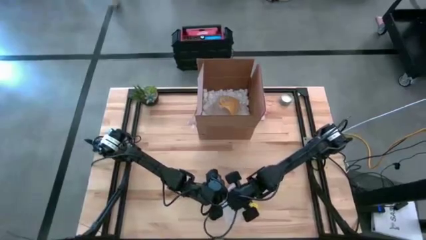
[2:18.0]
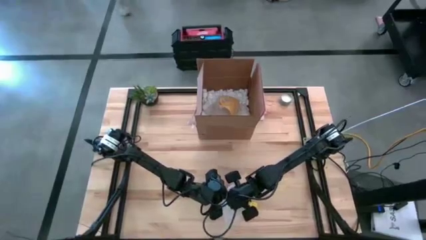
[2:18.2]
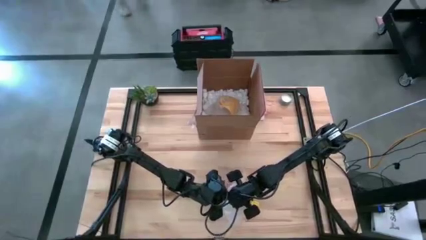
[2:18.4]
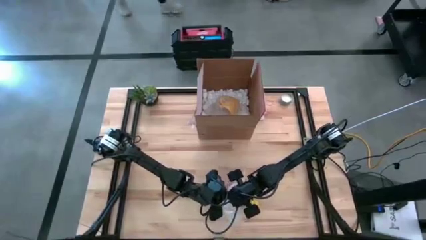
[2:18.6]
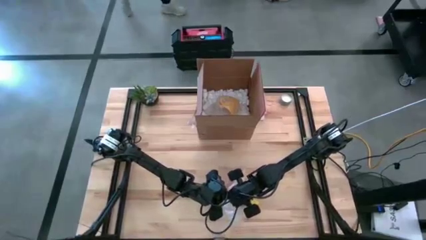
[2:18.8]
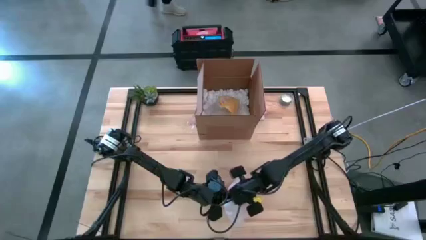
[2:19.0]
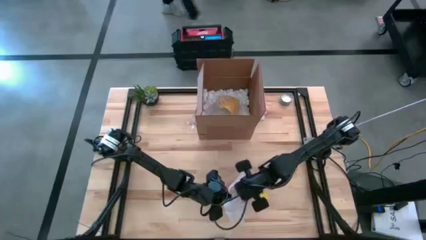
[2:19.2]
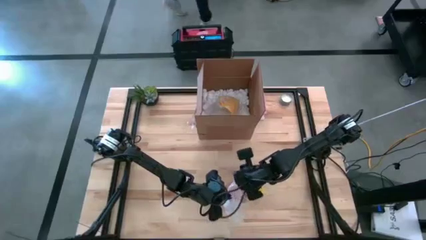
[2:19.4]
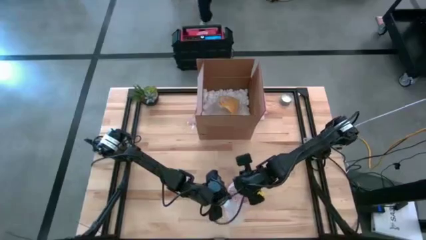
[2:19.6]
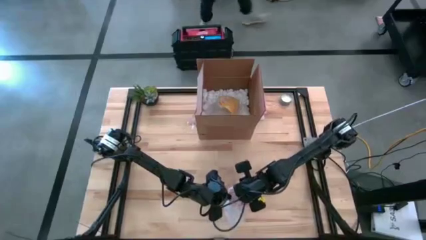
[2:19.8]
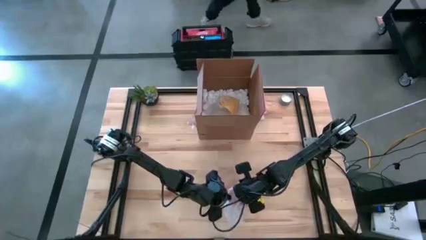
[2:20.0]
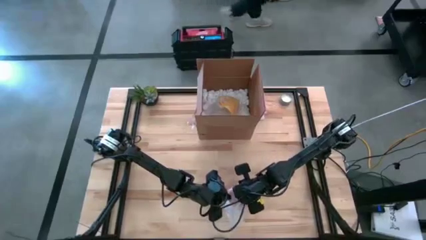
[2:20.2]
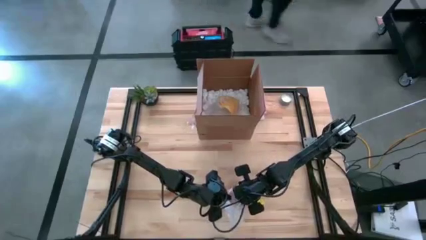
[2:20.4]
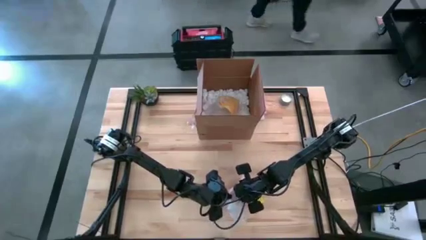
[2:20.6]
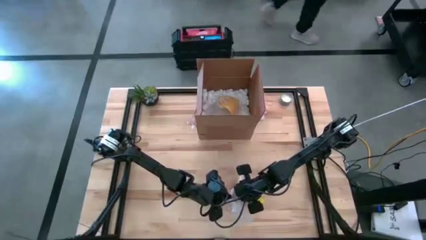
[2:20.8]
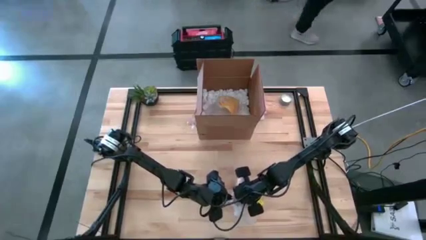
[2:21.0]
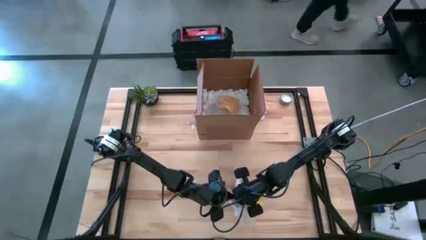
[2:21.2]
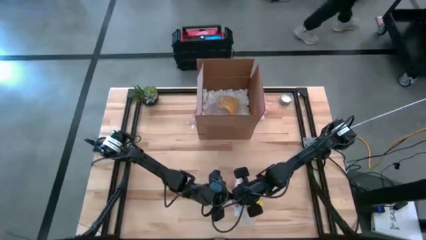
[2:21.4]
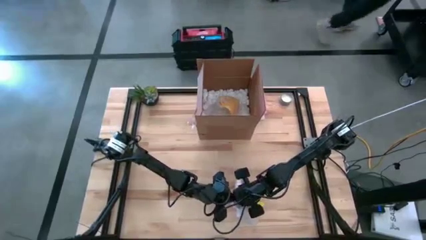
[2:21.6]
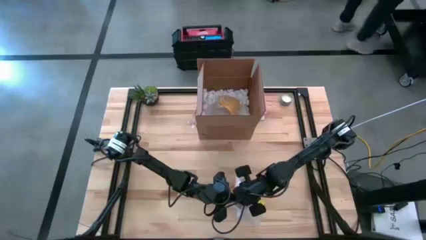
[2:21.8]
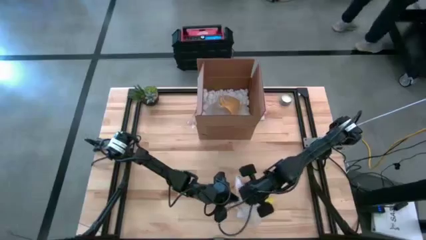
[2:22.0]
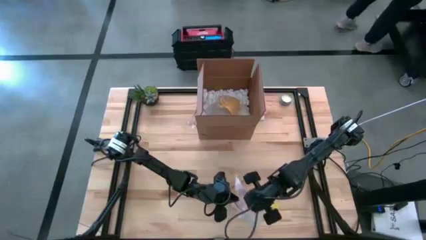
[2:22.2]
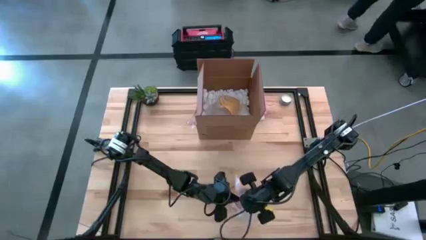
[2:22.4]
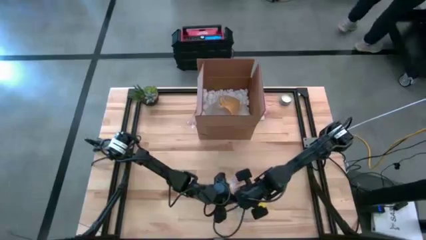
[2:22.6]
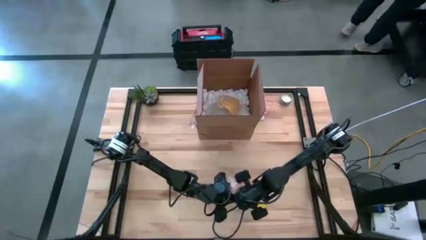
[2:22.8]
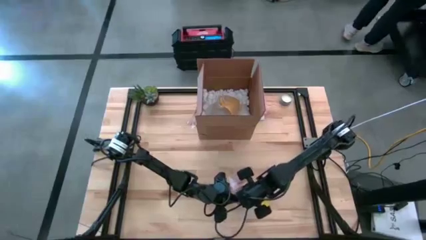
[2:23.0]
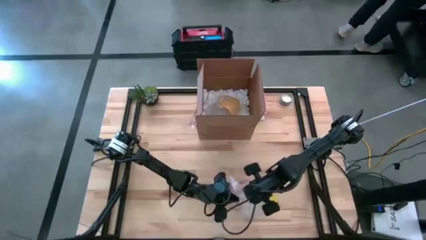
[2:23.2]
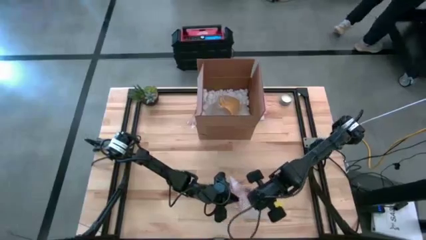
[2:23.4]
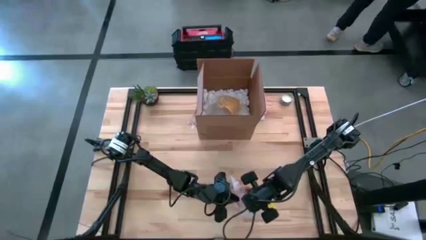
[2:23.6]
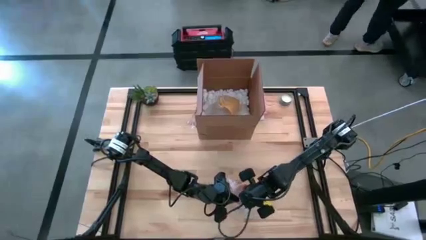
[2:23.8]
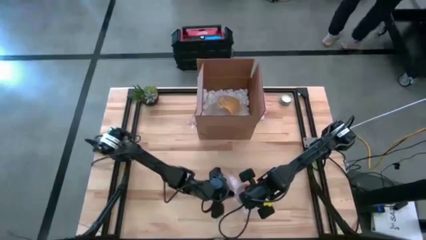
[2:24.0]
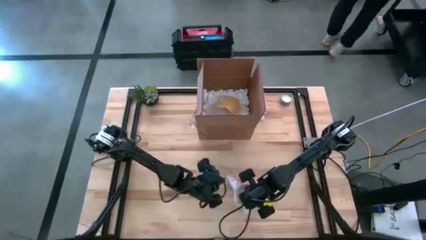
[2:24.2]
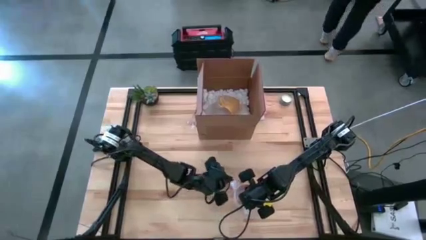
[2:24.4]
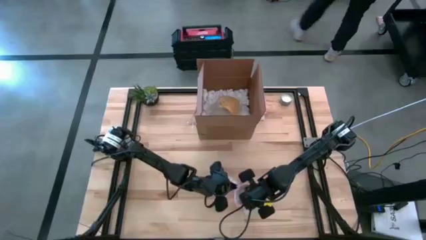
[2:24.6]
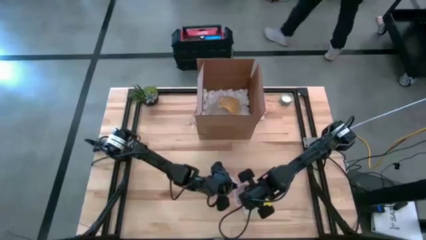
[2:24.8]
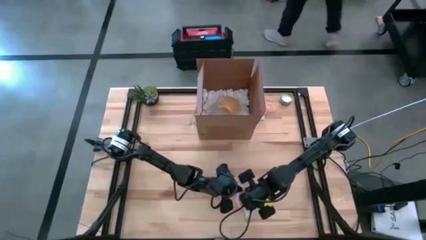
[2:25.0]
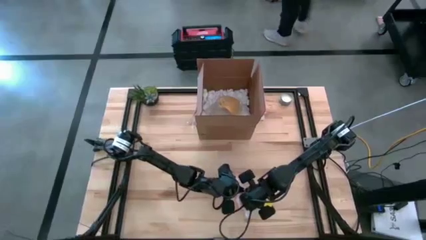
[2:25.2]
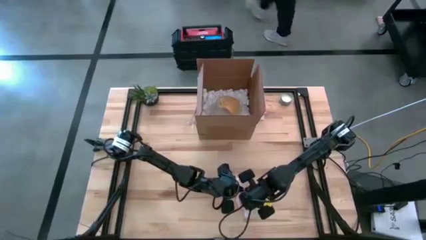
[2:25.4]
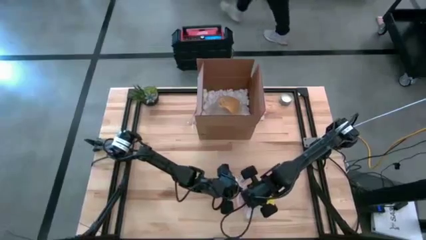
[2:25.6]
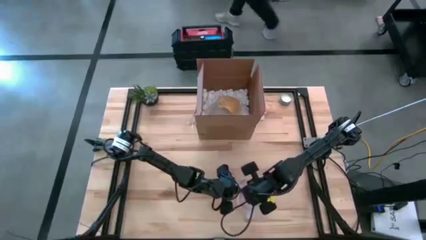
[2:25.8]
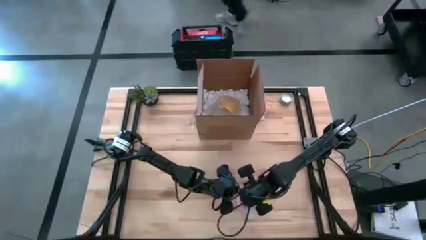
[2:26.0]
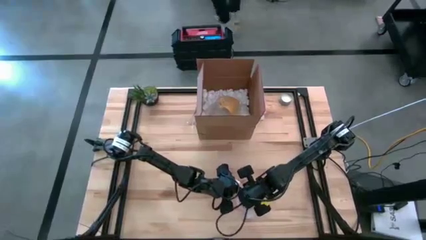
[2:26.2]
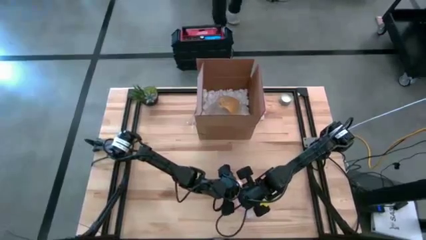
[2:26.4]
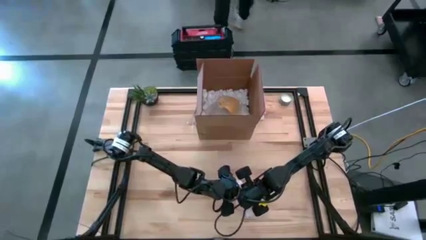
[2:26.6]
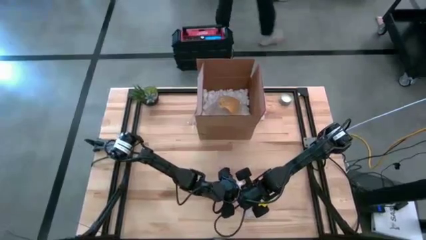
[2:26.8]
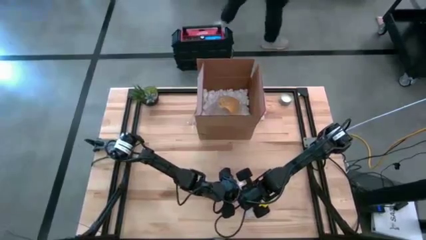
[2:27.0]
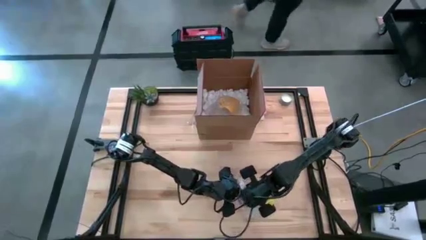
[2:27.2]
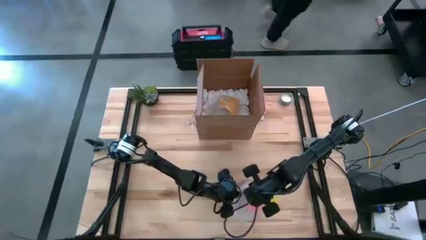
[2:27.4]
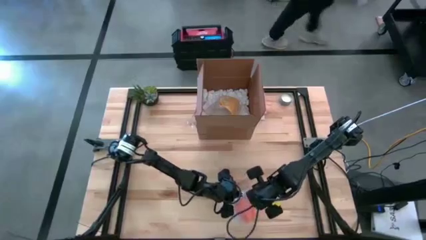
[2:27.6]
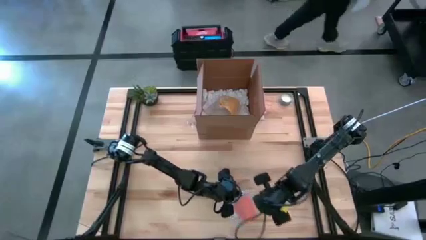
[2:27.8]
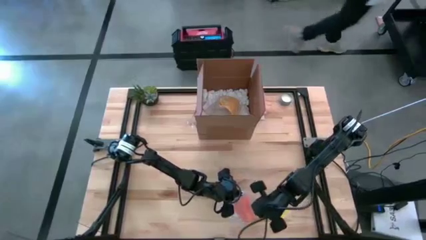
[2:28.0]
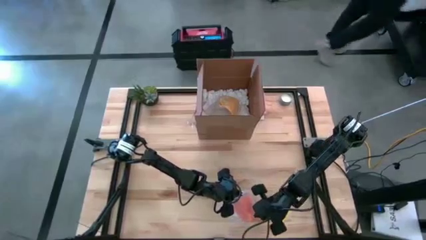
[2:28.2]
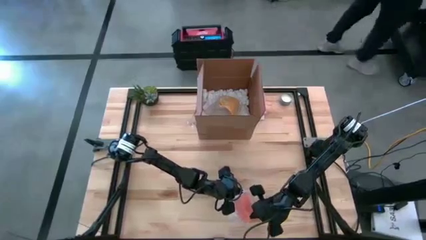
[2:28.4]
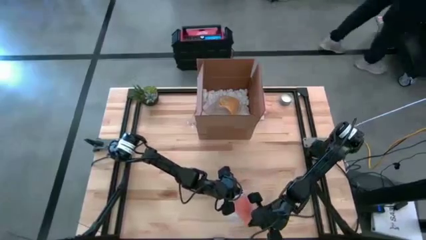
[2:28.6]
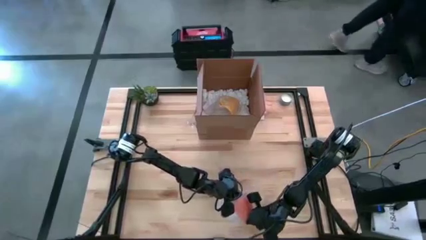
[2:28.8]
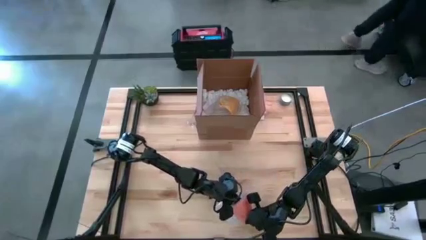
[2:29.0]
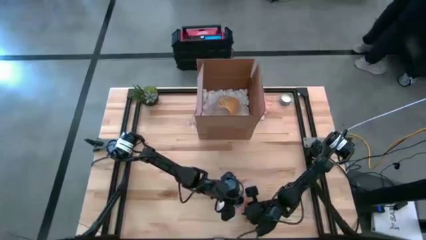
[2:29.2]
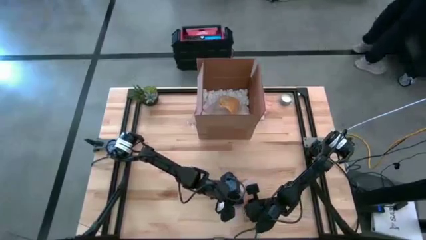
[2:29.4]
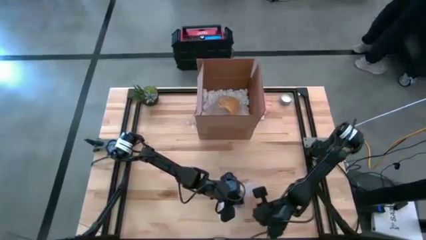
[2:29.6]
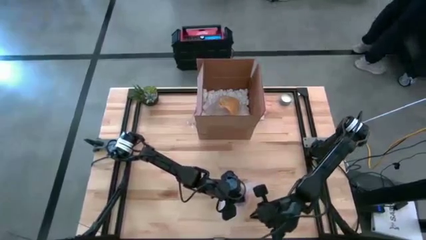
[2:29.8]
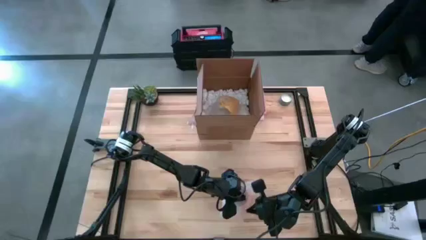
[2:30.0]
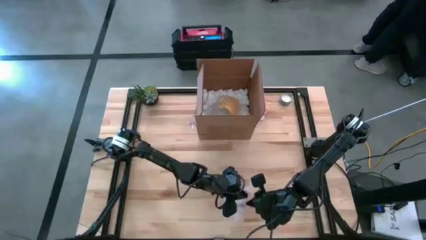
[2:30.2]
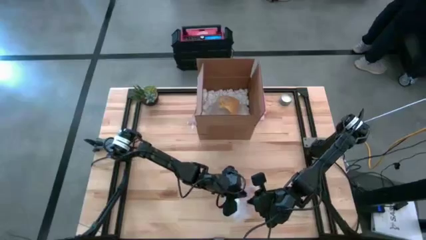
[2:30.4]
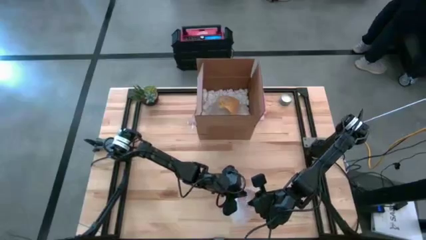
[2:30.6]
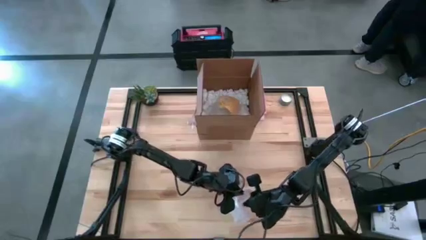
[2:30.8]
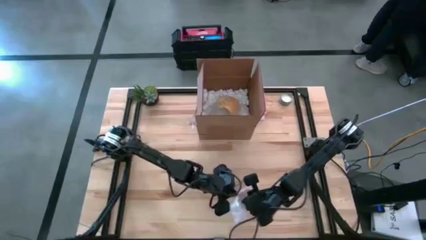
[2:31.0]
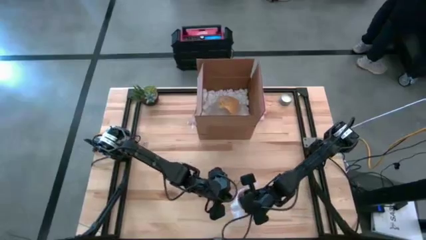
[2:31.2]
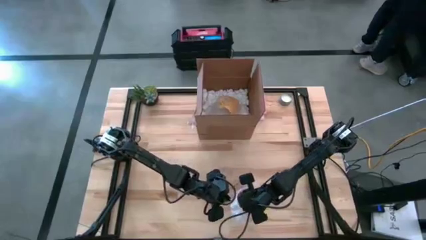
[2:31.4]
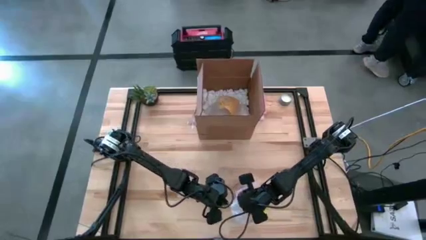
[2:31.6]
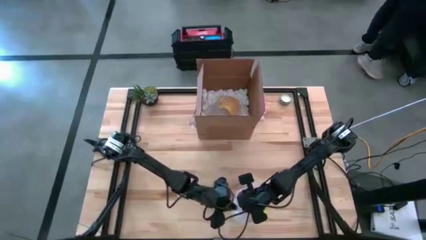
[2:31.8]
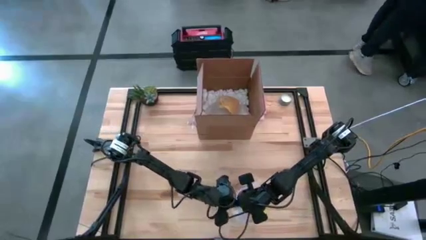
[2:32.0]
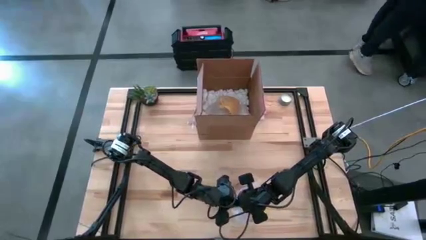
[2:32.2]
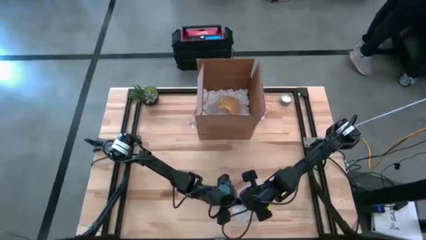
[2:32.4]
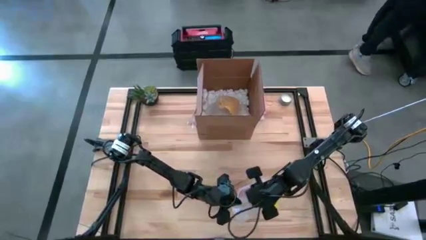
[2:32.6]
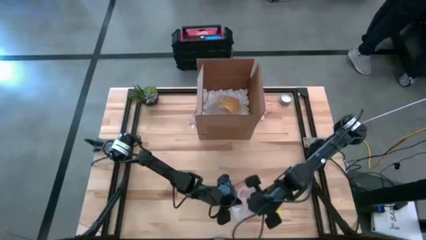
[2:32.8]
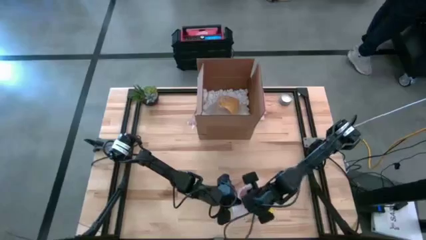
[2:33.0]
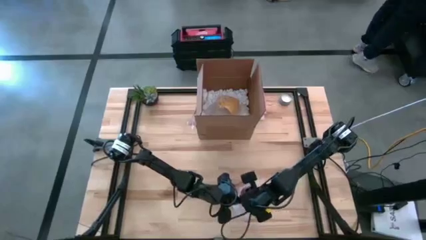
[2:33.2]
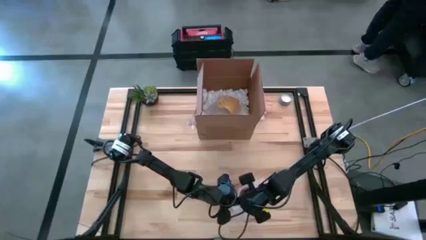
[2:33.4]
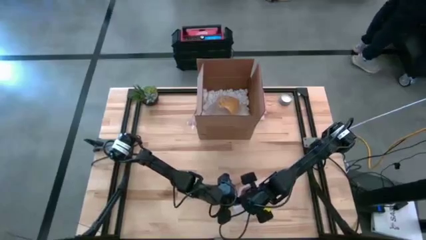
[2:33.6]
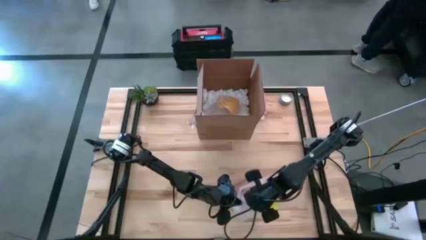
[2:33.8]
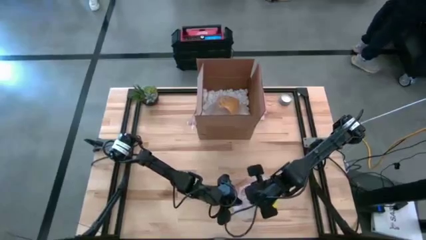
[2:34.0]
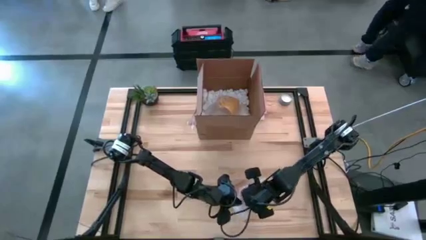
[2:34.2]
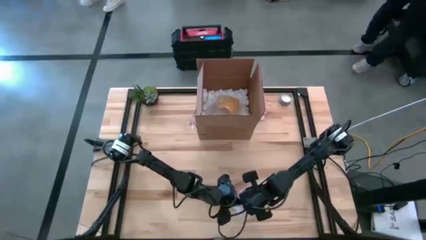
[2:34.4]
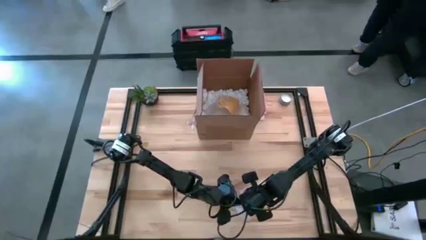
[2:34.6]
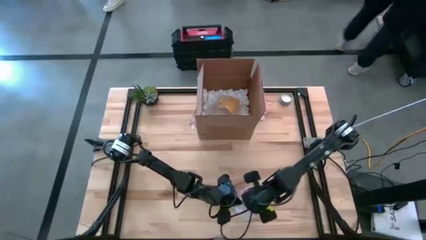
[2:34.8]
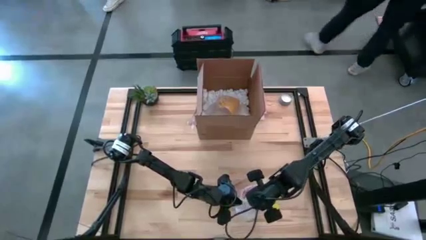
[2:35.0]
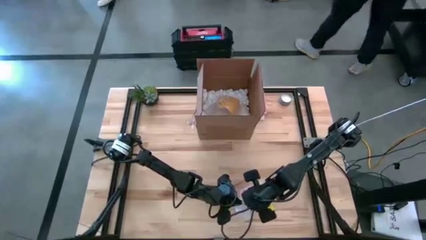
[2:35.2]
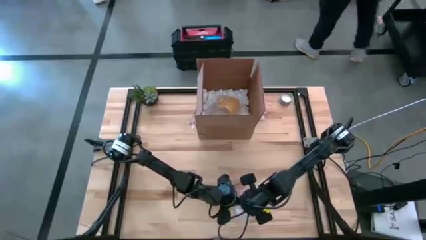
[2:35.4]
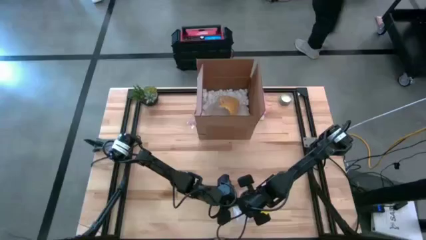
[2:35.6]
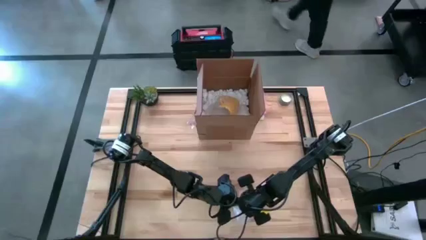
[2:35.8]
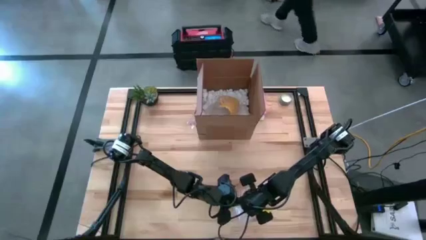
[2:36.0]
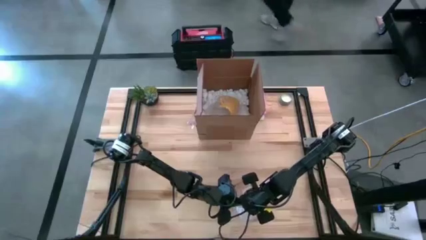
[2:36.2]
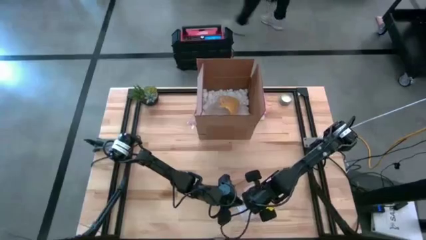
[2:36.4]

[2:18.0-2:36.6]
Task: wrap mug
Wrap the orange mug with the transparent bubble wrap
